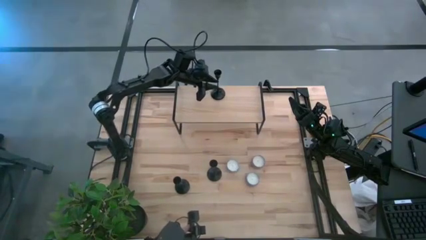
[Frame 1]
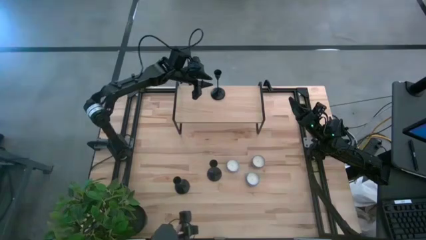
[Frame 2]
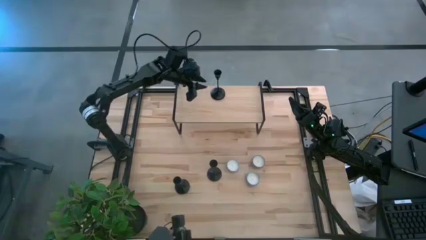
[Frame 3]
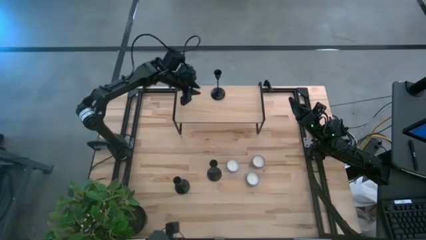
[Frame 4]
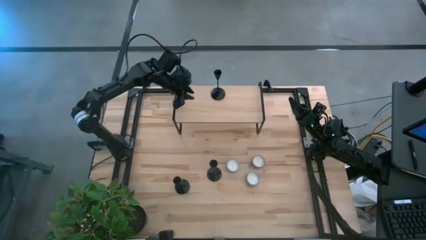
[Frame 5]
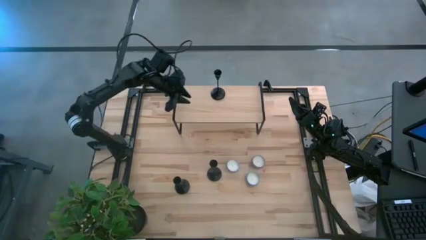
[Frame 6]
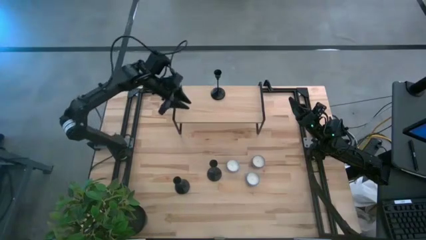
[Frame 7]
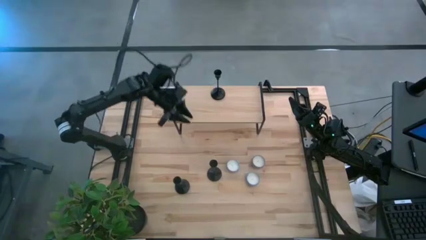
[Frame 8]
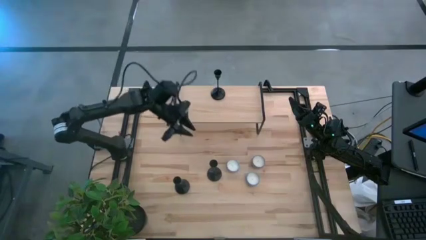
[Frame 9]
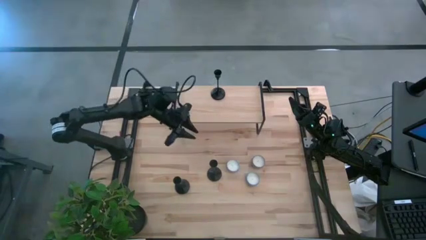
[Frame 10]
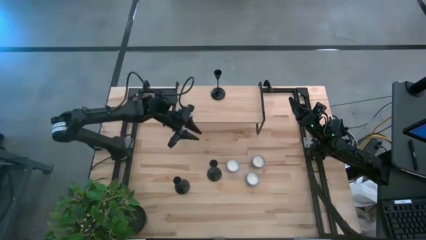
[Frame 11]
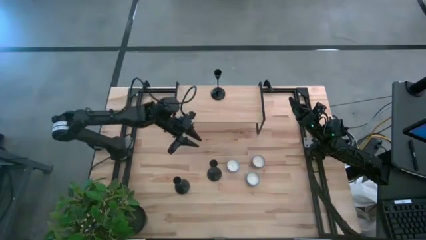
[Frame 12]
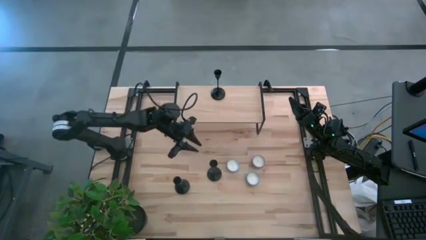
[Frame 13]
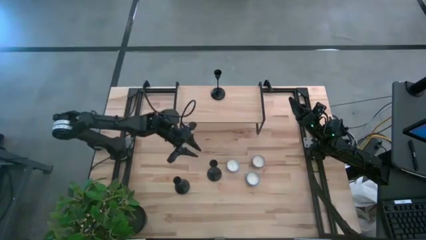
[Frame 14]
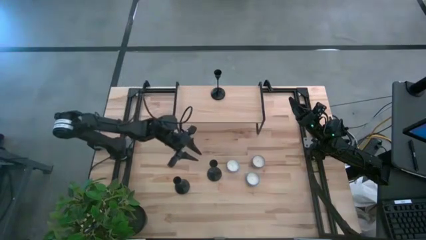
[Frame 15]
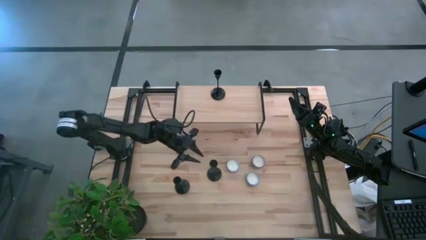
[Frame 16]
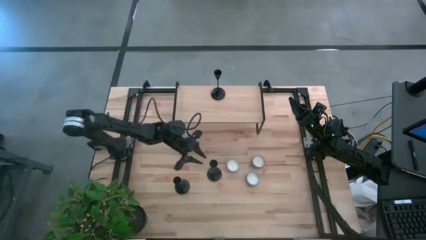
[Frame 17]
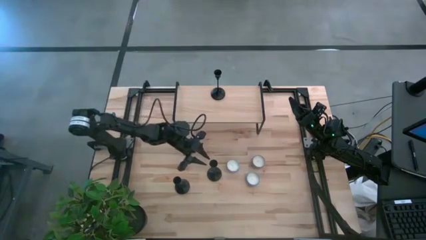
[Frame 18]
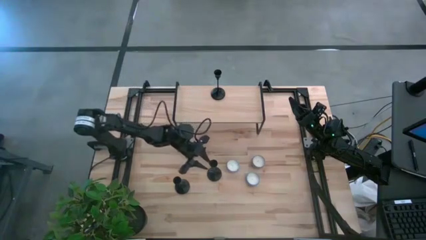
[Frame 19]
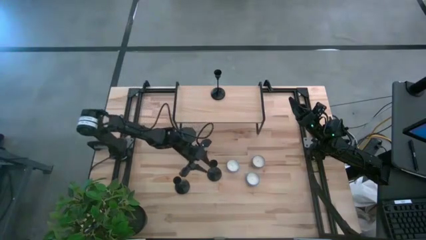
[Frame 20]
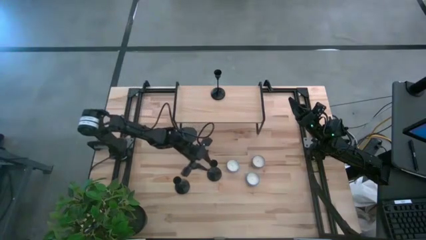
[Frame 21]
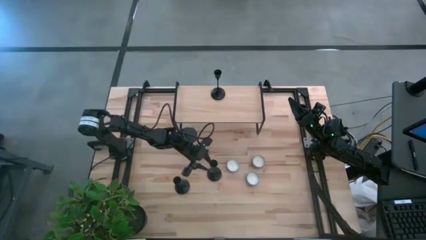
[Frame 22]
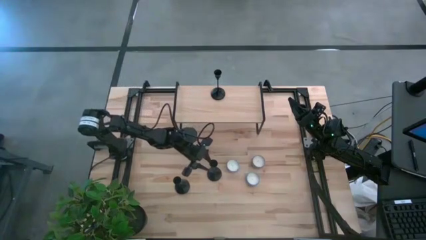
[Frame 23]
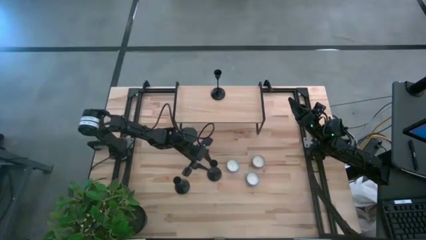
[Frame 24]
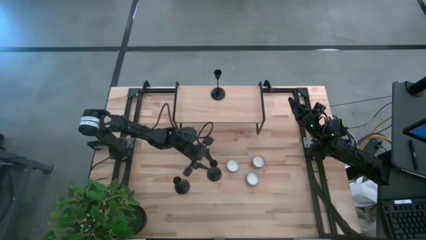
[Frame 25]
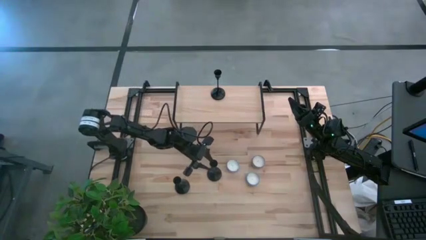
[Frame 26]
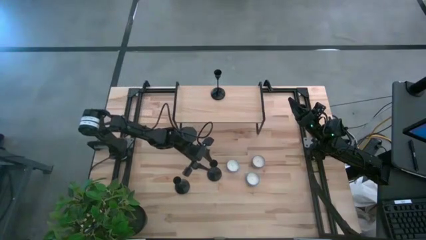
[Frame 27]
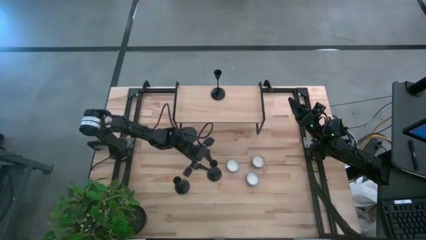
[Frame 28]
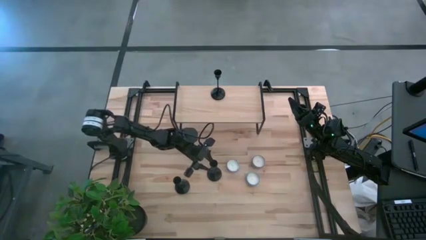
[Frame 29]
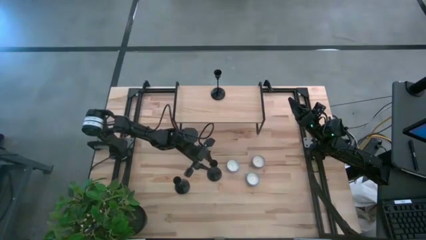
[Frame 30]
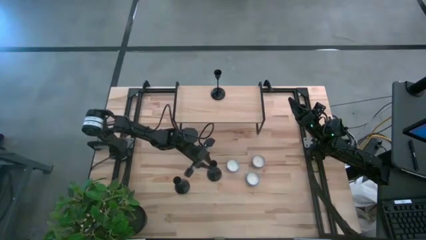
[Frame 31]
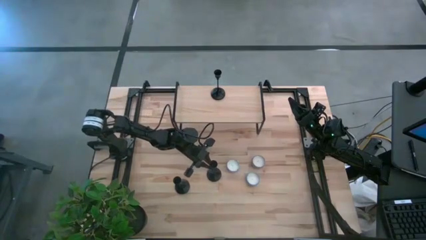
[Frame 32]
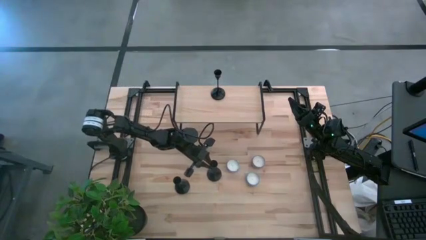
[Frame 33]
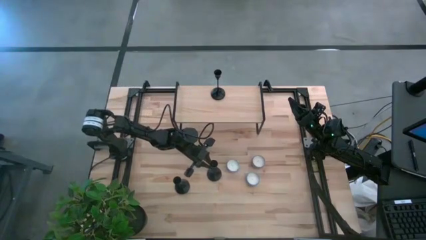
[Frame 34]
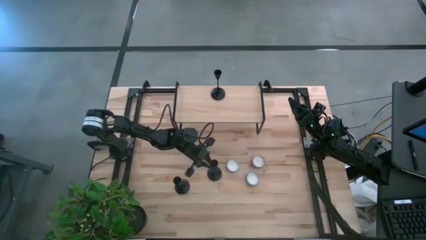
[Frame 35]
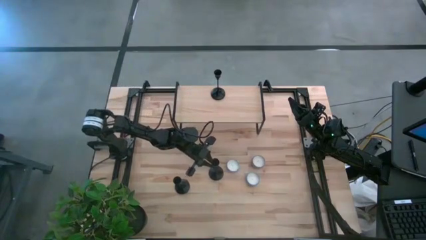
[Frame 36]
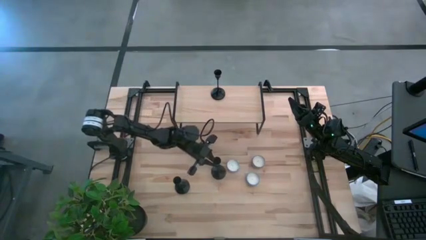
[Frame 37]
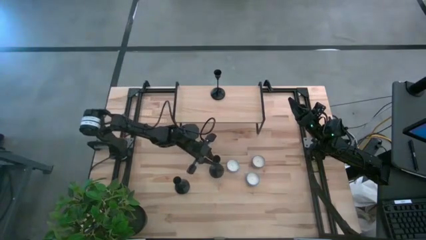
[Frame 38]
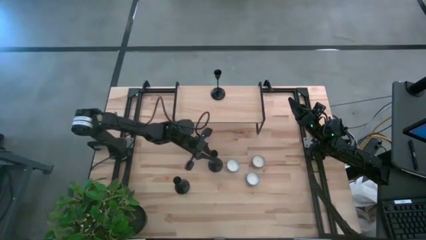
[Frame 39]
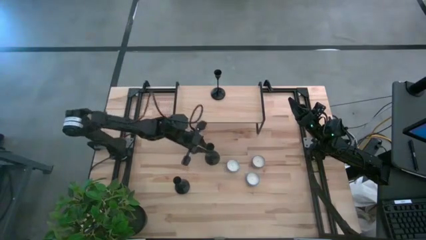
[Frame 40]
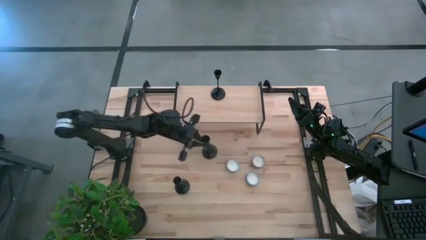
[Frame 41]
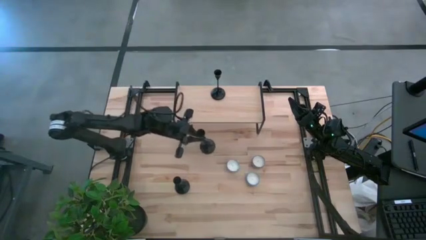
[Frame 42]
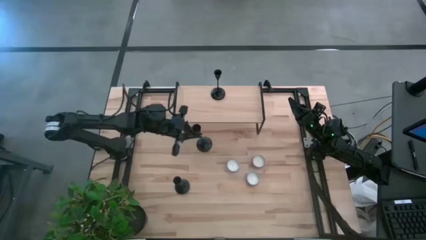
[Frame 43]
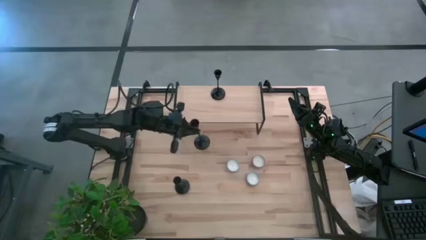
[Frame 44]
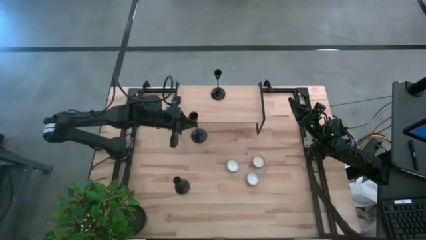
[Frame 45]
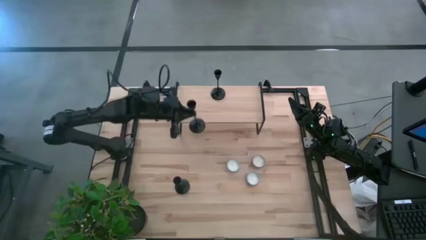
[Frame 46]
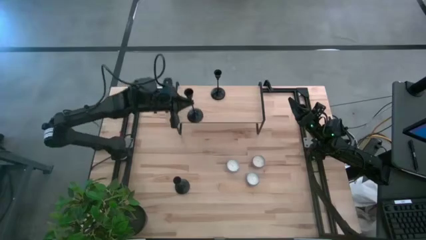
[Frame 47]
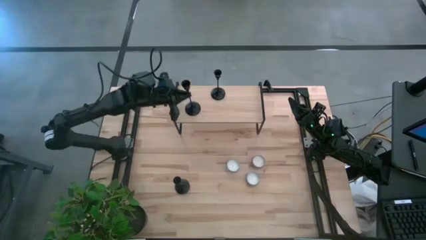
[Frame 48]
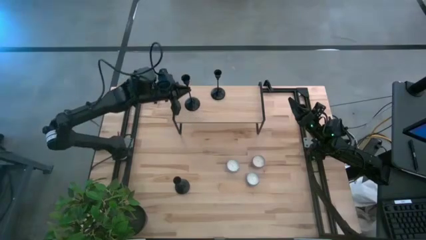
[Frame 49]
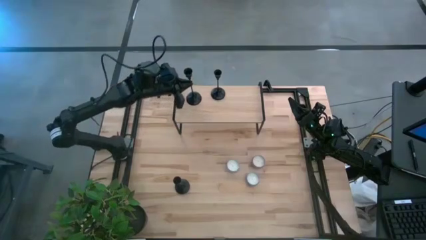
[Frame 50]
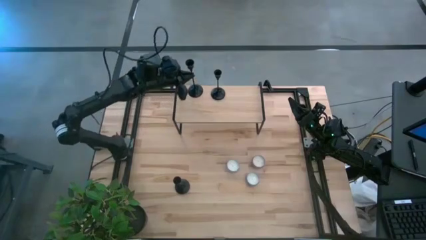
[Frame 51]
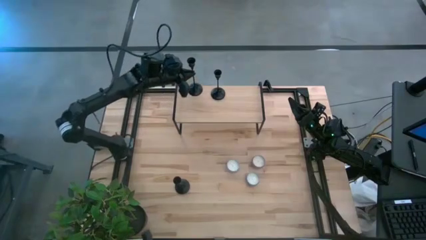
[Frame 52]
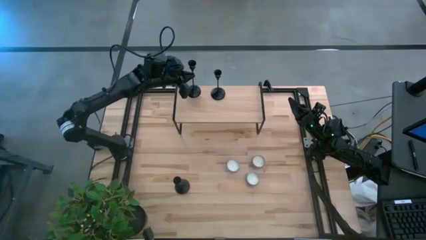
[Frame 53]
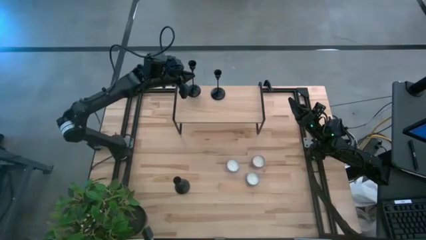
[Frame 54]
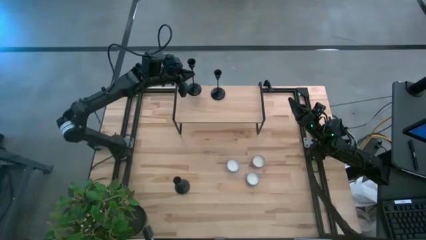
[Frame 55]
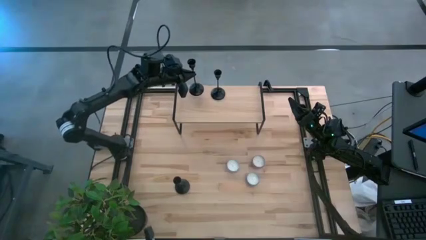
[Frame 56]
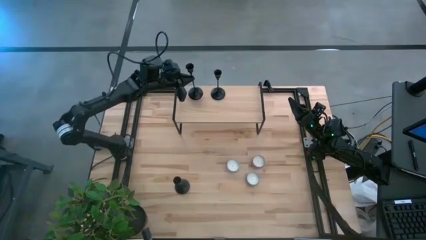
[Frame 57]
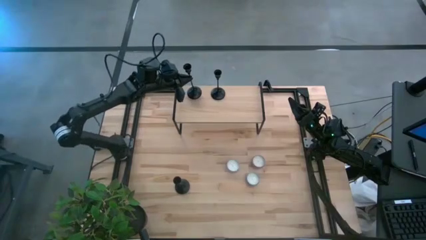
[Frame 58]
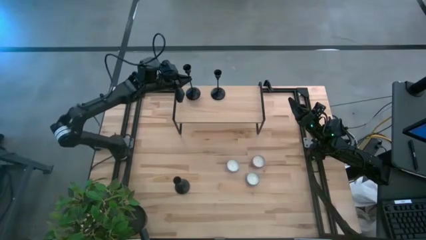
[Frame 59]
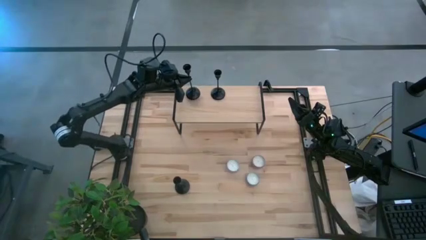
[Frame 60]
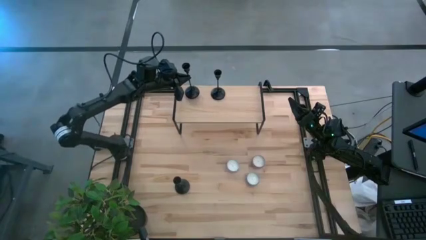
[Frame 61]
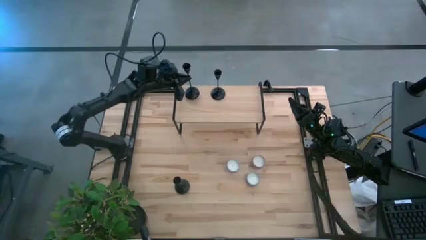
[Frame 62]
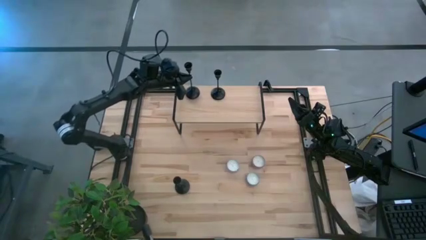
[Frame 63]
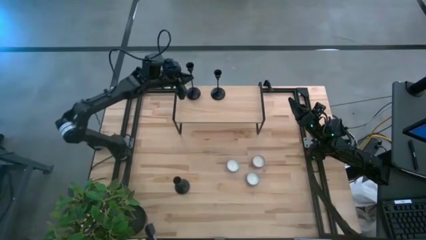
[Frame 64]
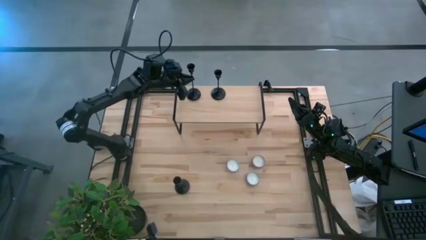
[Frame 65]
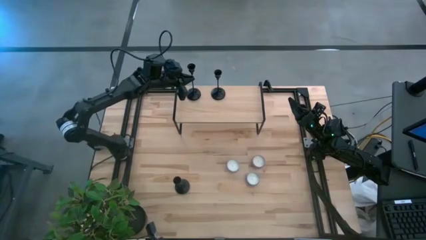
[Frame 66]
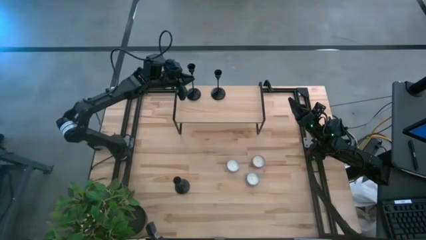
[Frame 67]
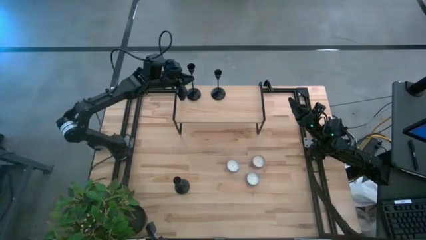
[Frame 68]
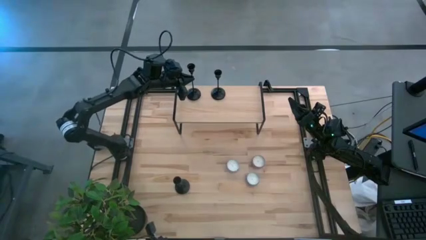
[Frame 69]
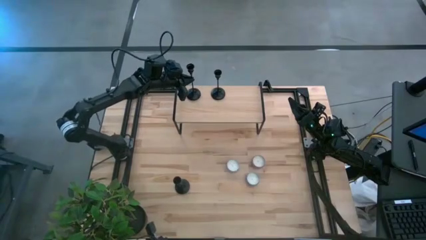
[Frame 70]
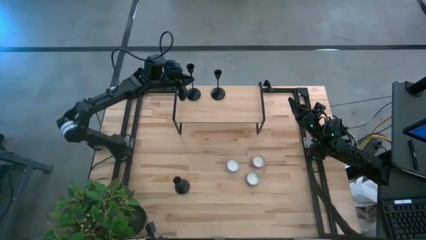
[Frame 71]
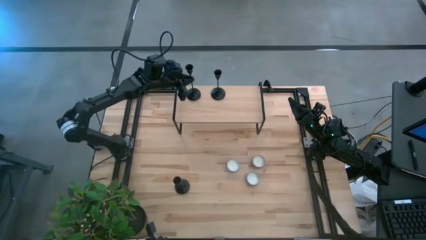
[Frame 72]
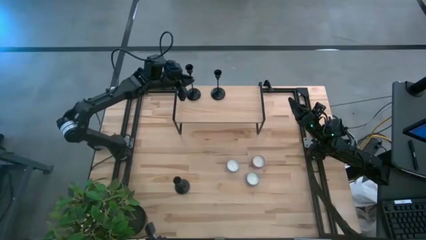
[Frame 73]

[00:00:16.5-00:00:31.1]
Task: Pick & Place candle stick holders
Align the top black candle holder with the other candle holder on the shelf
